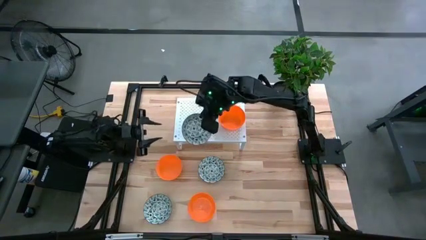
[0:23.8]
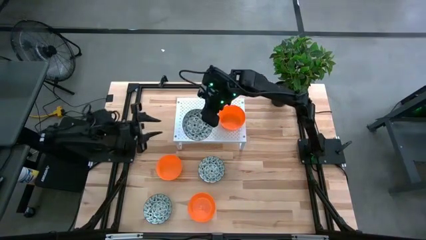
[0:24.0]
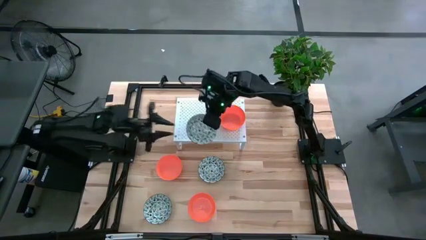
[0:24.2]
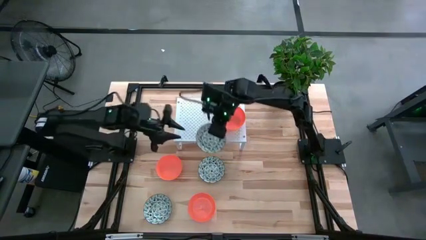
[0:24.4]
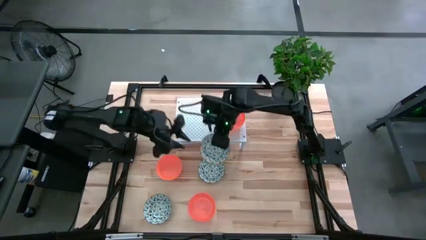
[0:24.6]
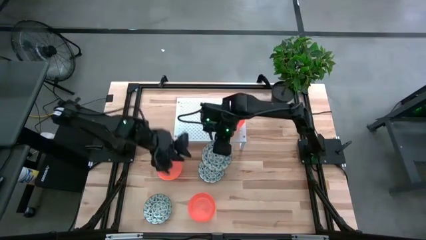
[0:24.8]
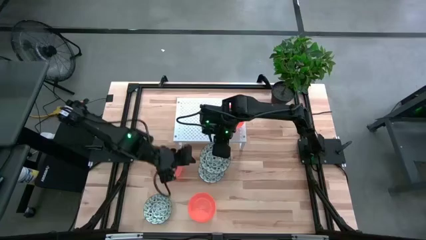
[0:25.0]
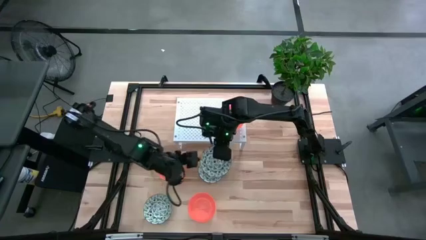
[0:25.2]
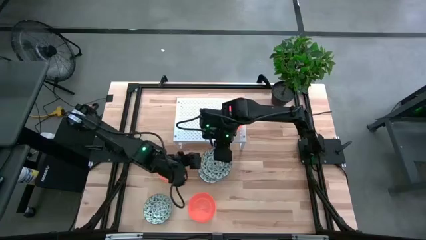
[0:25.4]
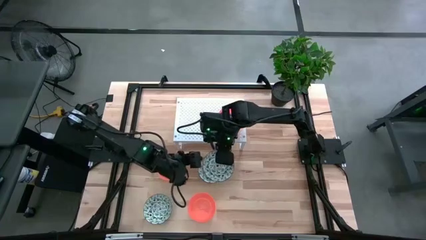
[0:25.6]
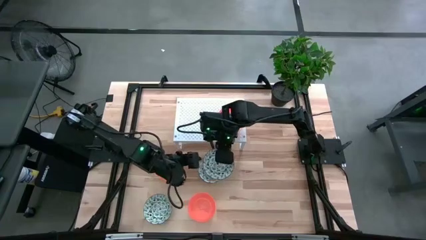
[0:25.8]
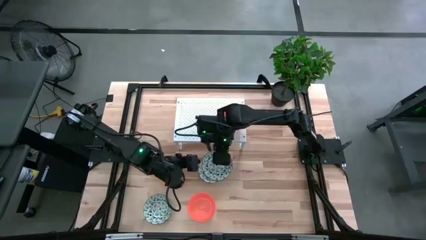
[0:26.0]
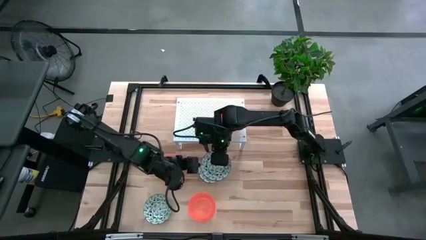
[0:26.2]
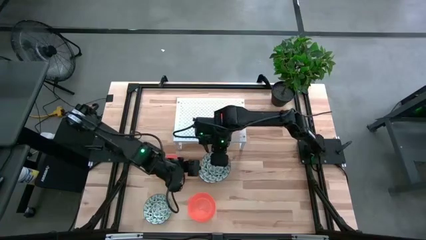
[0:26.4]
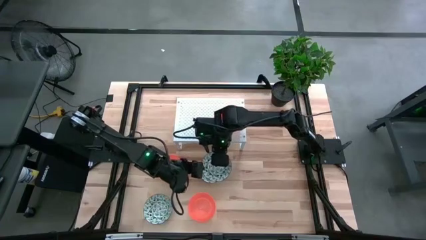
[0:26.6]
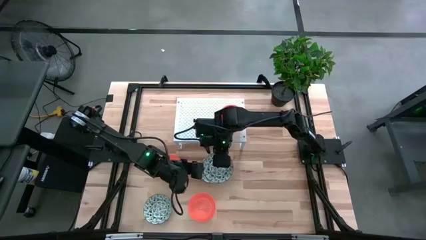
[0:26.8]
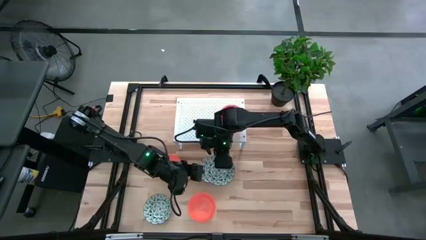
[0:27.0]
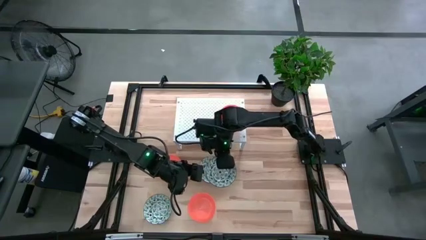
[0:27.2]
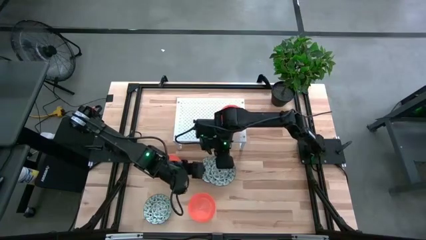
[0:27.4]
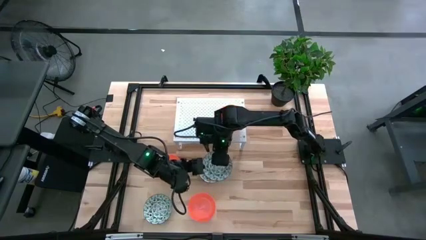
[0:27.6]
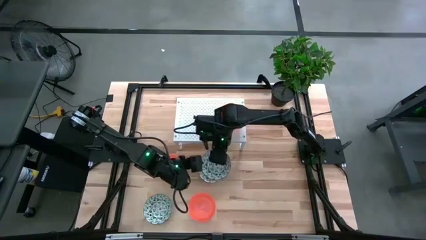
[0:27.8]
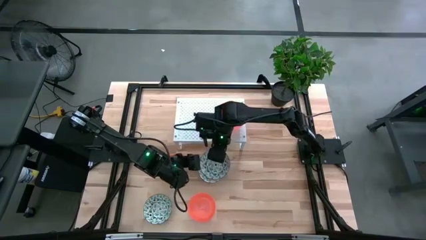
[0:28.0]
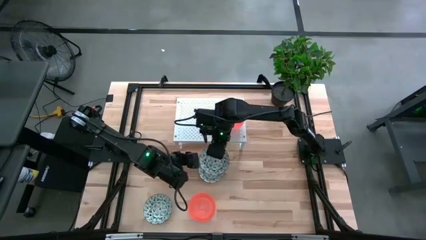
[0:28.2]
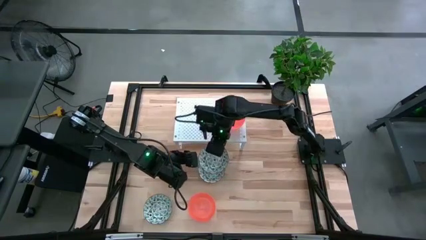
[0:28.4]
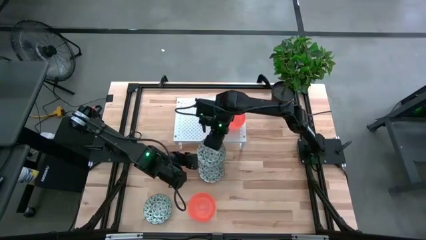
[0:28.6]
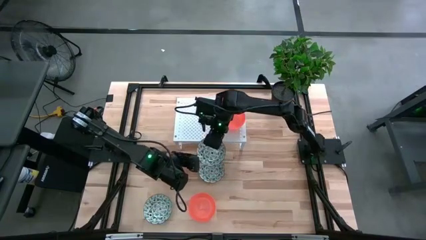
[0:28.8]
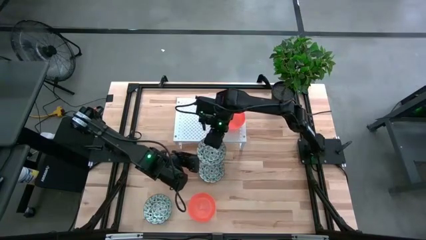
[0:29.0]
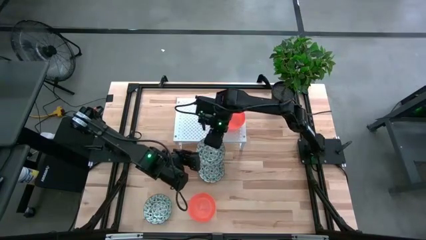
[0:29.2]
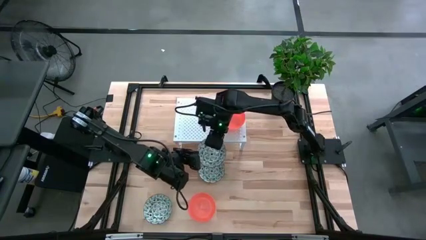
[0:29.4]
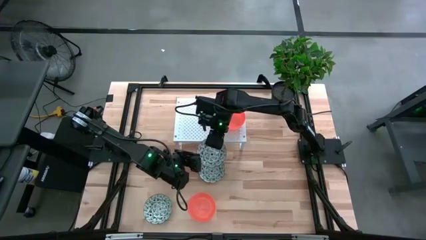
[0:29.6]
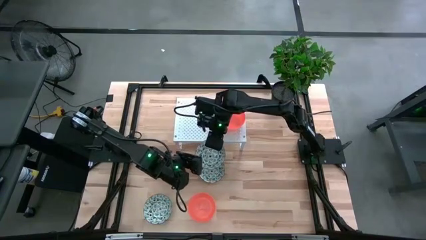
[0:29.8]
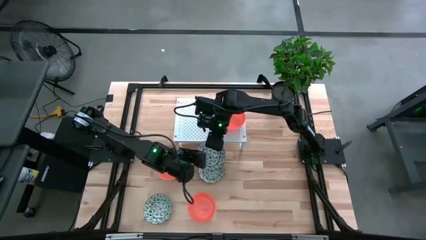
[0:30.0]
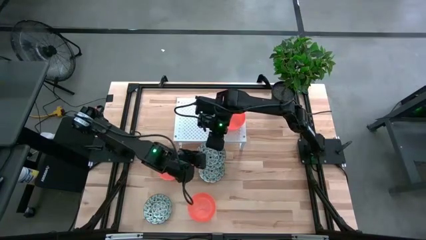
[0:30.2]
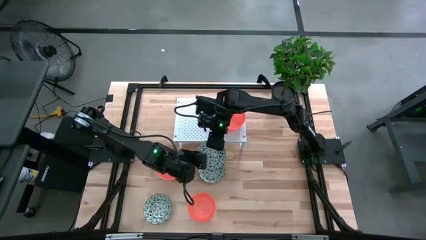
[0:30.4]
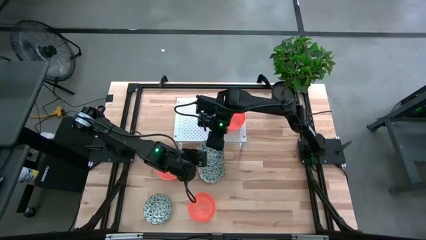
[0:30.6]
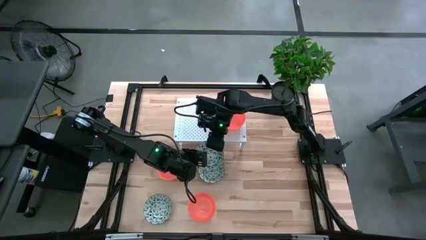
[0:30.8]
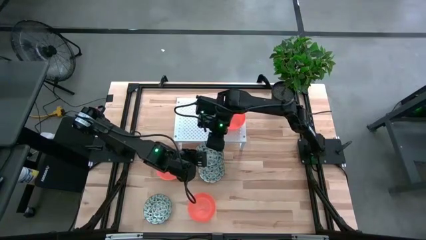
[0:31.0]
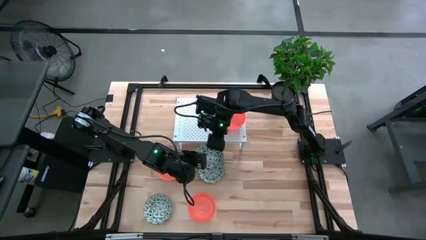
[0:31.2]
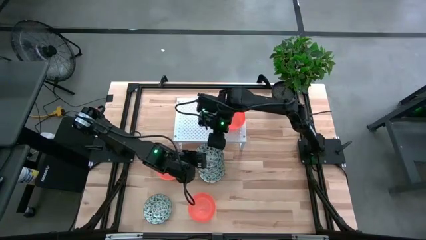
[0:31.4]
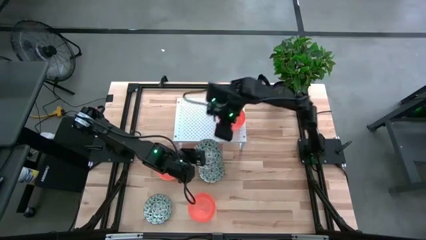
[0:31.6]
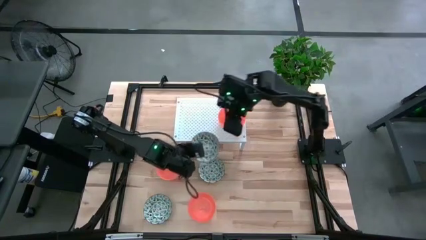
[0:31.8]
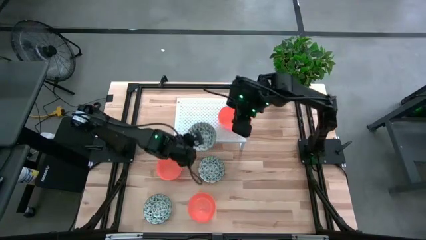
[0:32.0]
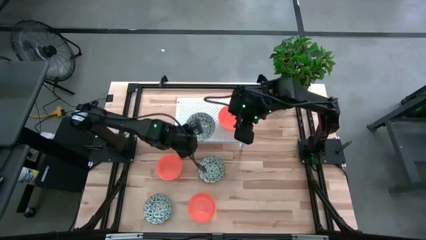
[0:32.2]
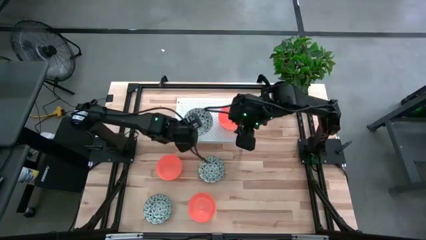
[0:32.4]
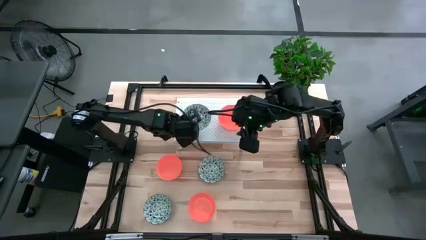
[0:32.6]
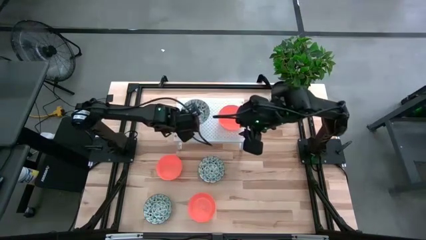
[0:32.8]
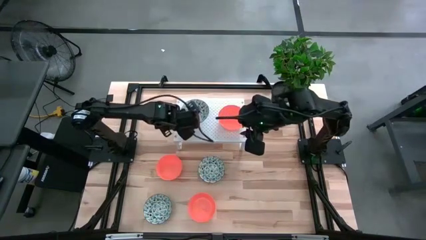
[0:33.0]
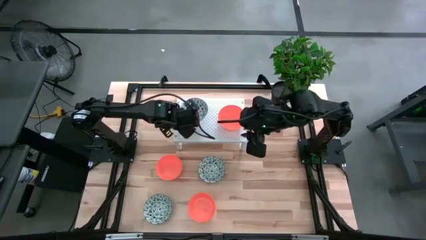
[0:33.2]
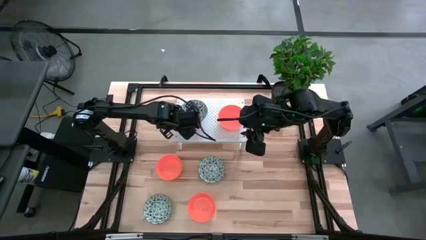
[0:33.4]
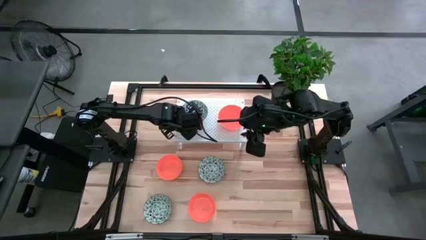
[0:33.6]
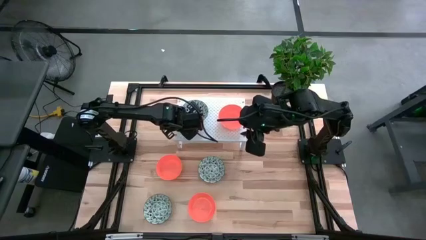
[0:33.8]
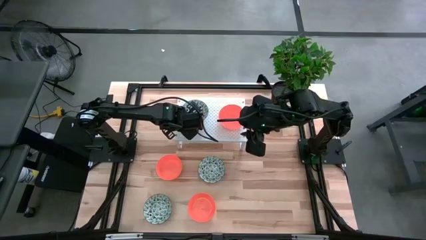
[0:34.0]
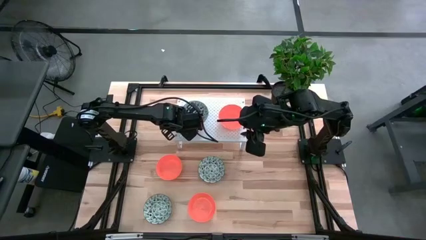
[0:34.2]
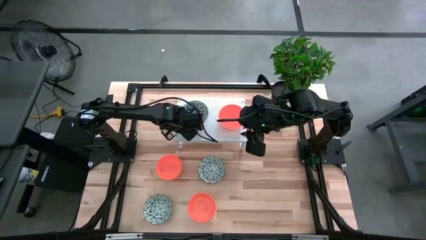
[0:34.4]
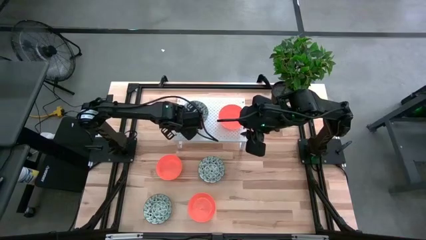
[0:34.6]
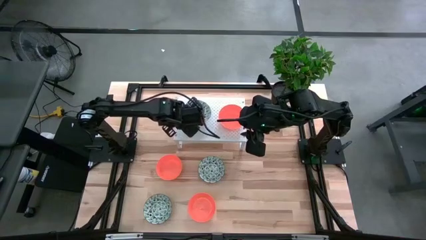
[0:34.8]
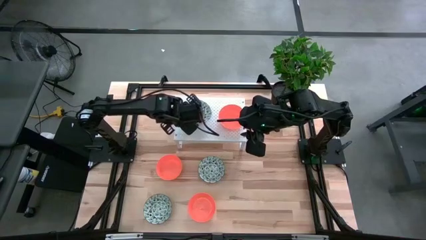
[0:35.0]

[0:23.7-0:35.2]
Task: Pick & Place Mini bowls
Put the bottom right green and white patterned bowl on the shelf

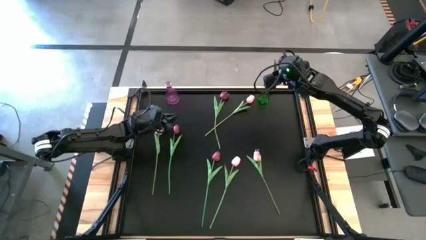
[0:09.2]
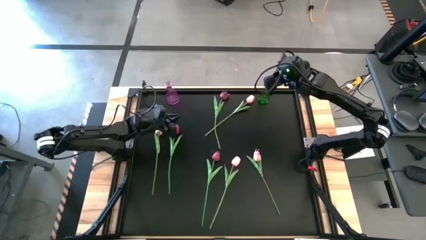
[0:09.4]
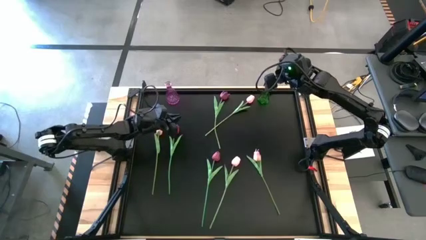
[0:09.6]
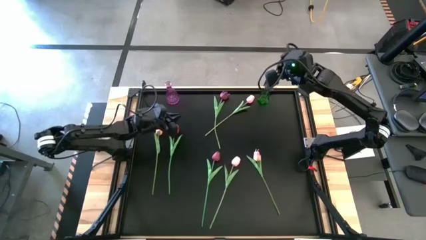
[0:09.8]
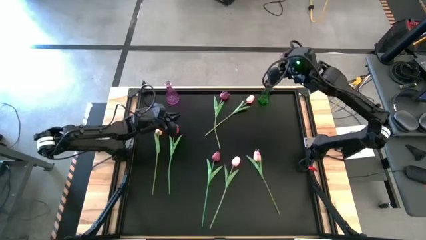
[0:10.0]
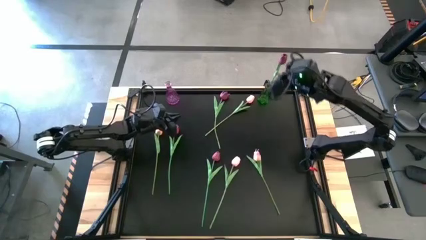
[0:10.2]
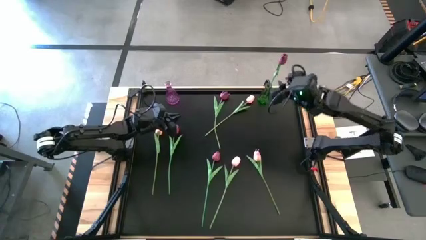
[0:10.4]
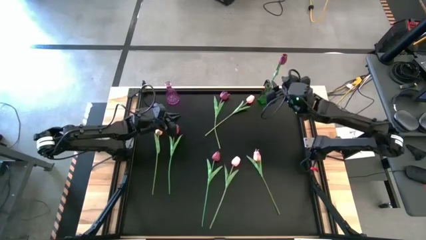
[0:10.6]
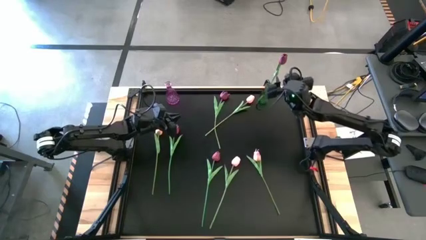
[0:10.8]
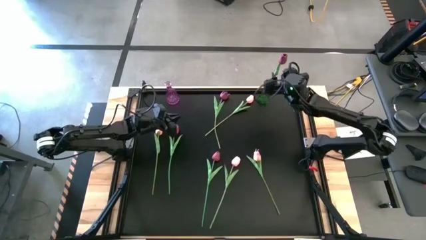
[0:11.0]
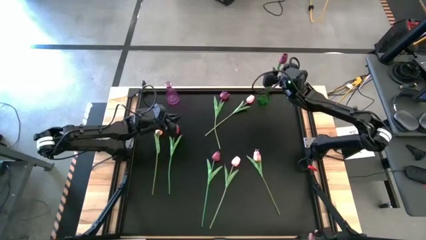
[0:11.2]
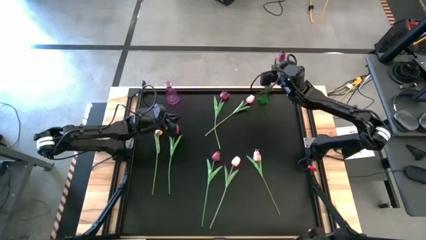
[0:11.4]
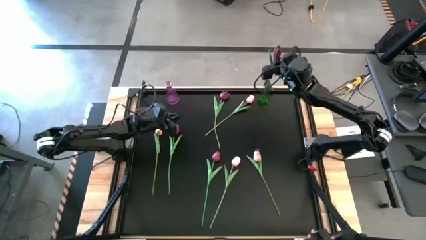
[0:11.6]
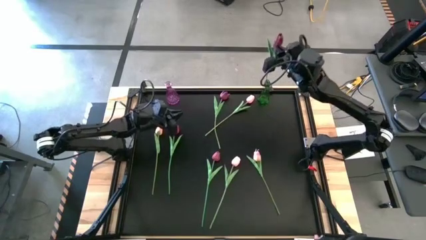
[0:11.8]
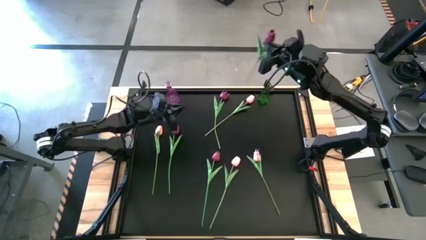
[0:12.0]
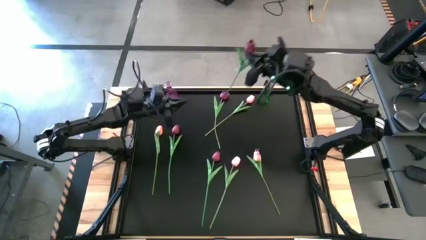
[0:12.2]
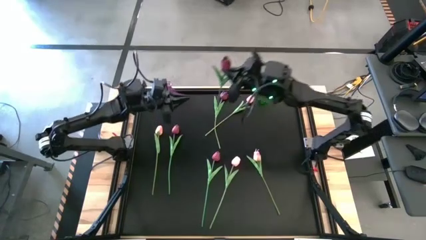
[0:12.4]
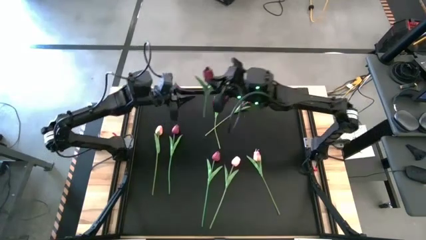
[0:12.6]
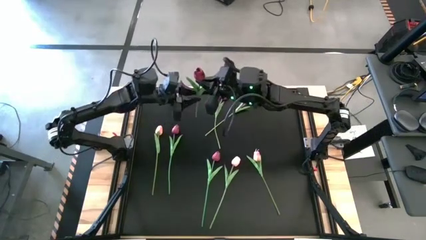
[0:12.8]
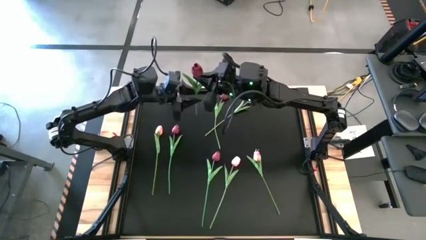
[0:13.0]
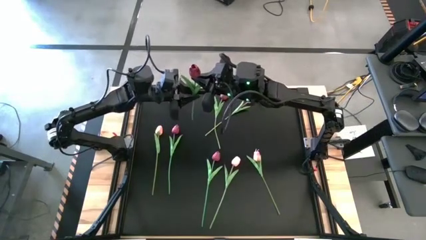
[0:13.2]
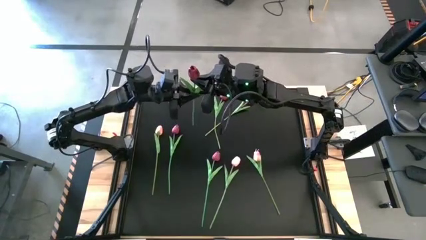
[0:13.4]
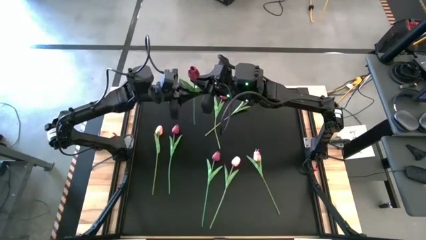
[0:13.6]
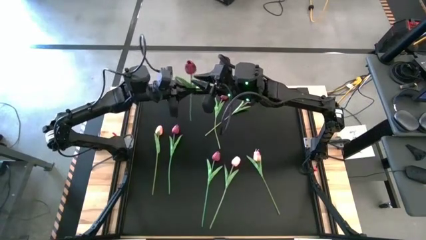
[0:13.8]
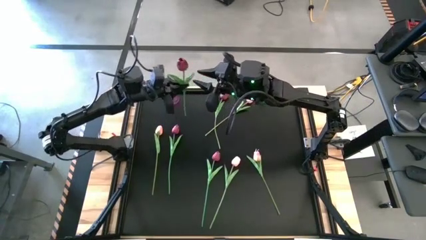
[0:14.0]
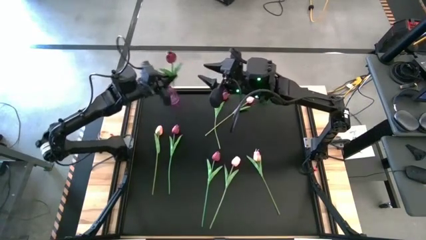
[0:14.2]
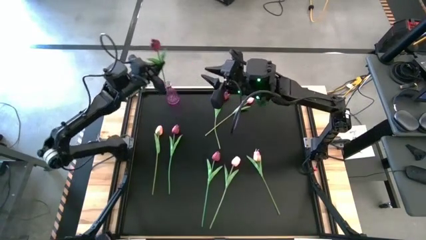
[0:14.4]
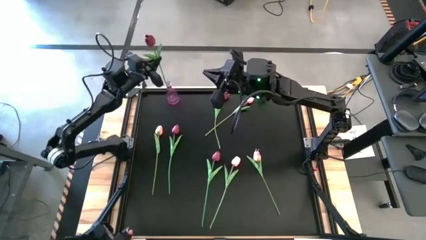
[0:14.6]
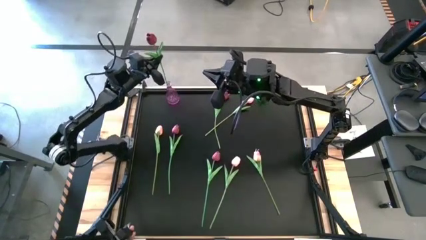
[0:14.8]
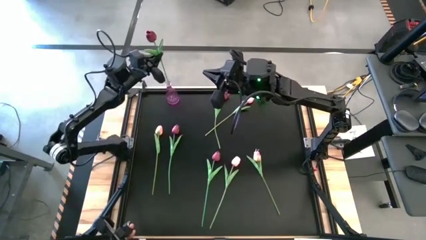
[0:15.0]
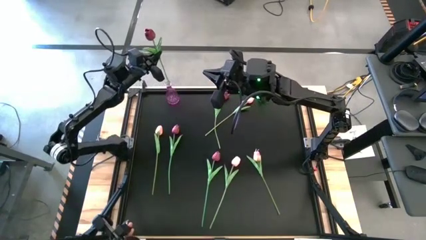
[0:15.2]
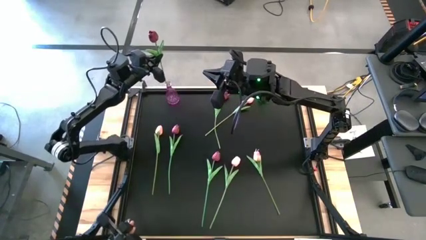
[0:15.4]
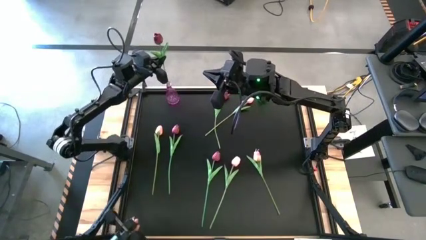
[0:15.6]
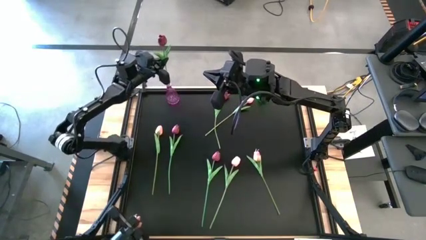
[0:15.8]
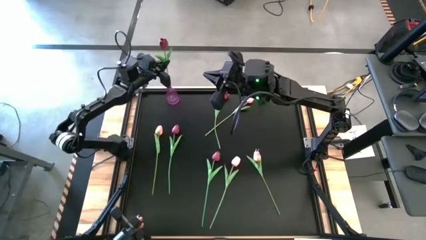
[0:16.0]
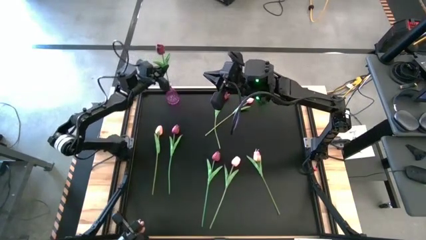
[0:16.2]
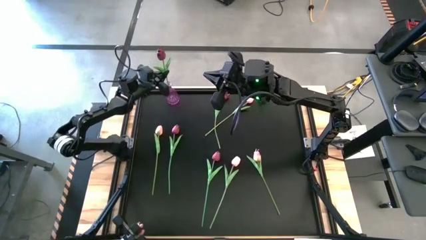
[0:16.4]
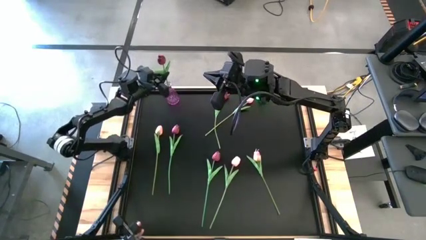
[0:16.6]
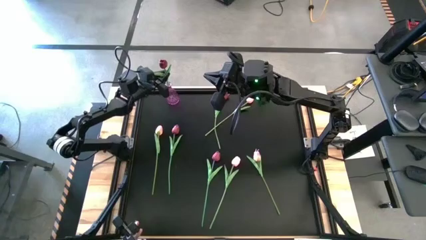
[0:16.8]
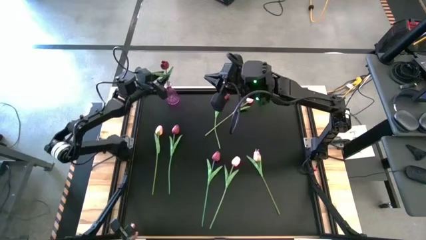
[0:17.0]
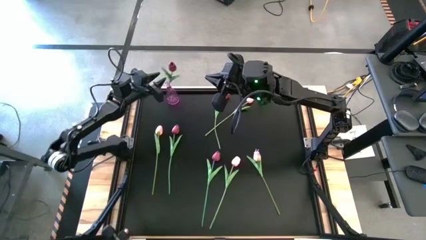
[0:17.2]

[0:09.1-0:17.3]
Task: Sort flowers into vase by color
Put the bottom right red flower into the purple vase
